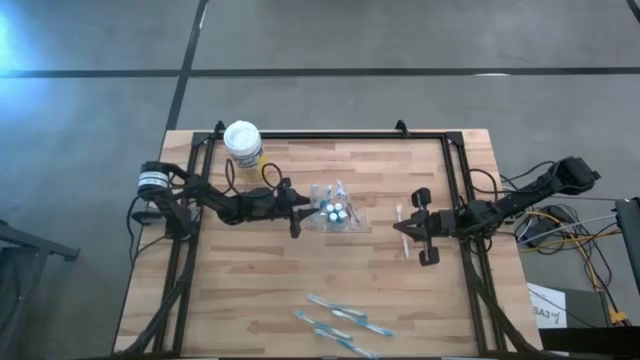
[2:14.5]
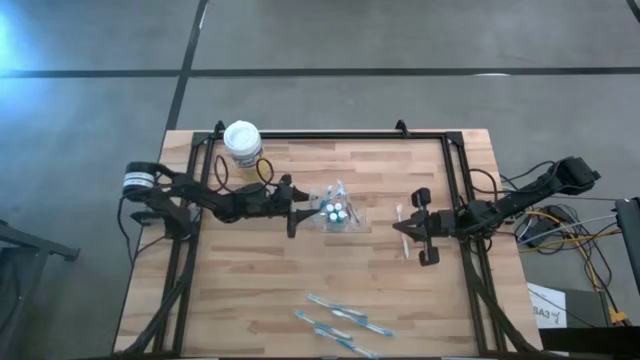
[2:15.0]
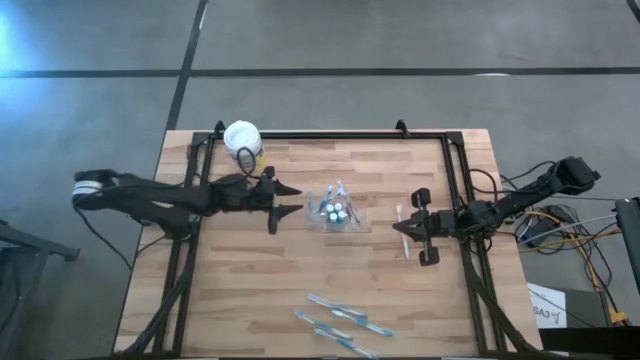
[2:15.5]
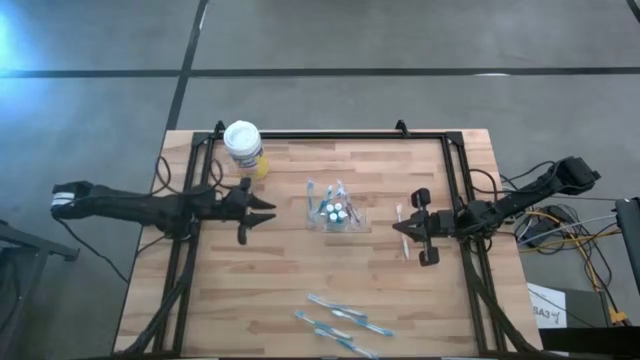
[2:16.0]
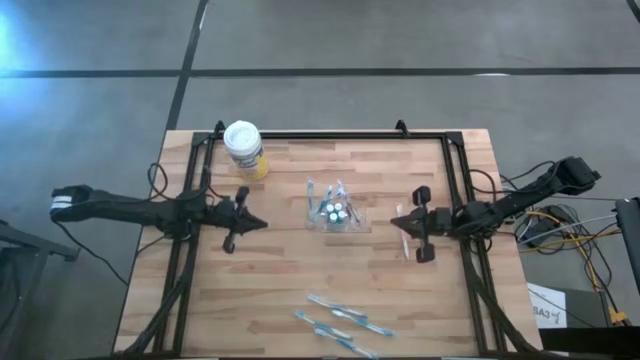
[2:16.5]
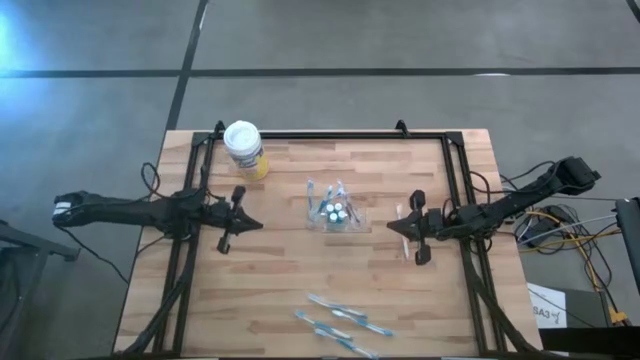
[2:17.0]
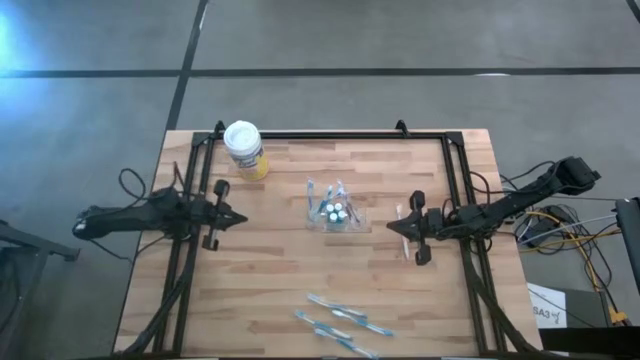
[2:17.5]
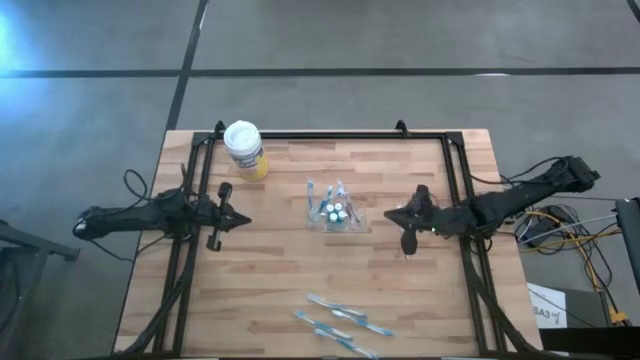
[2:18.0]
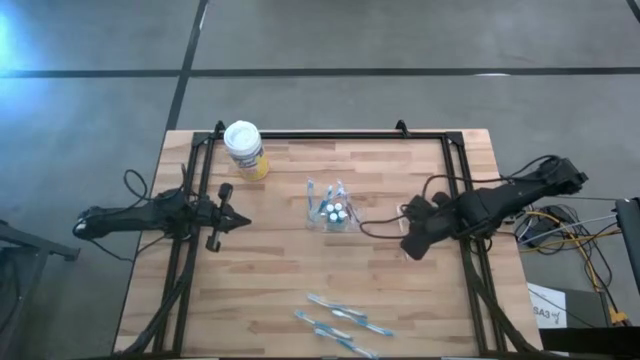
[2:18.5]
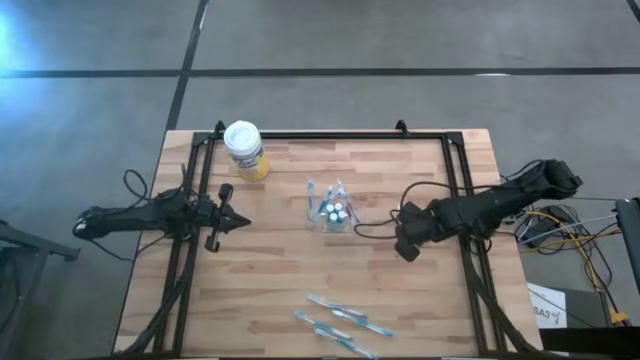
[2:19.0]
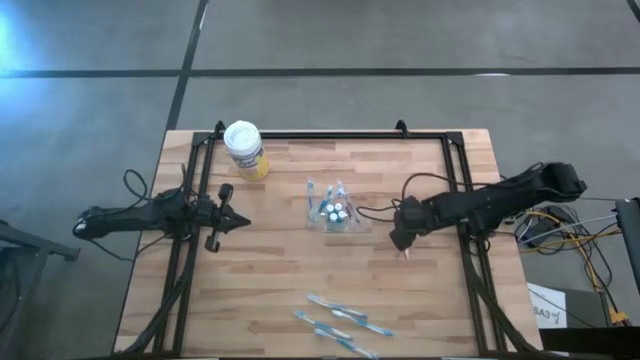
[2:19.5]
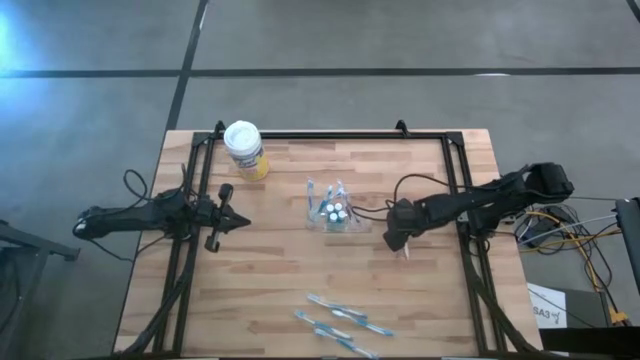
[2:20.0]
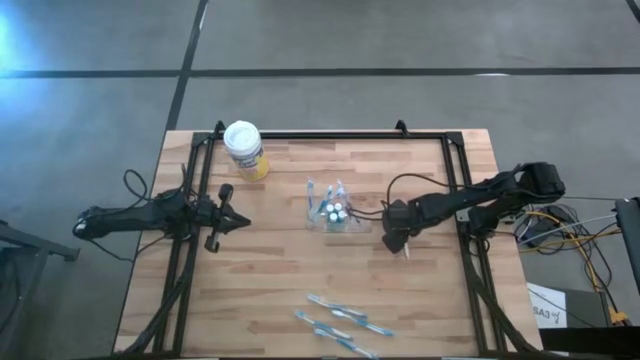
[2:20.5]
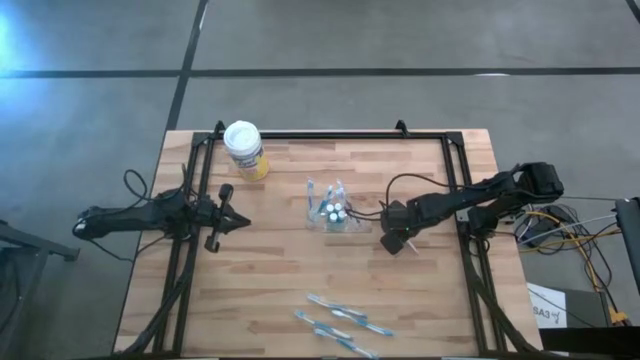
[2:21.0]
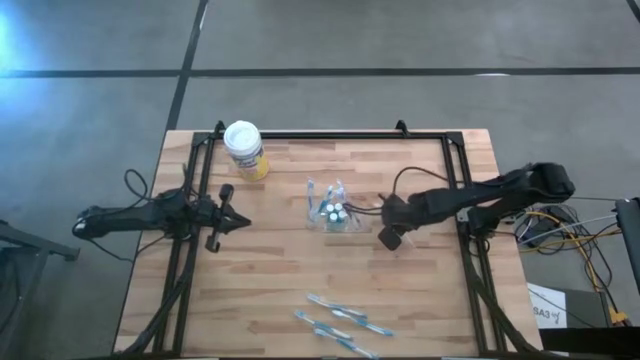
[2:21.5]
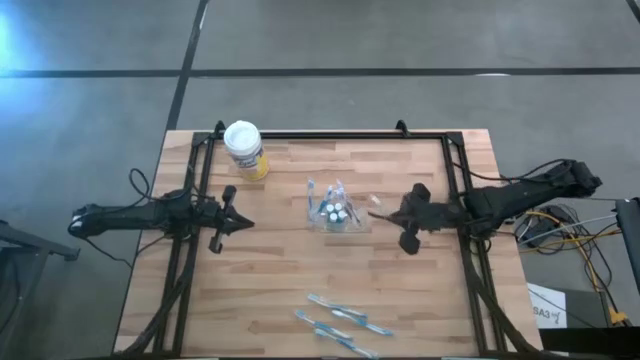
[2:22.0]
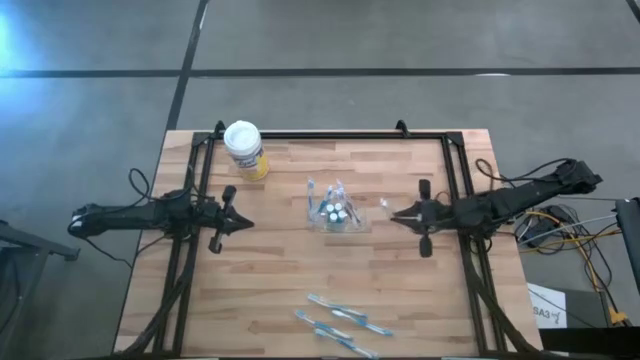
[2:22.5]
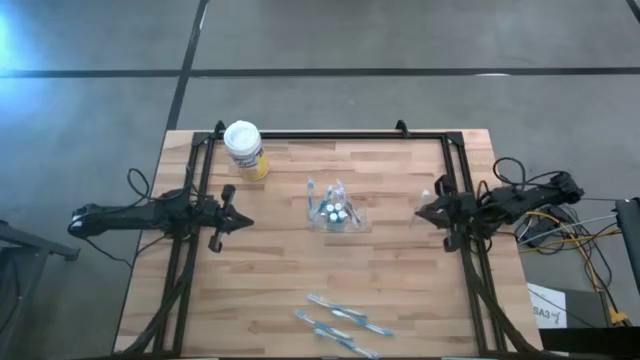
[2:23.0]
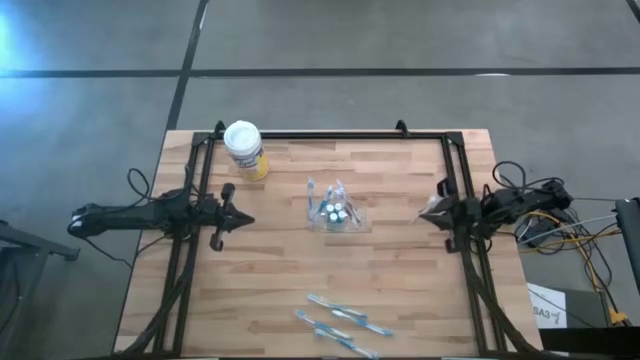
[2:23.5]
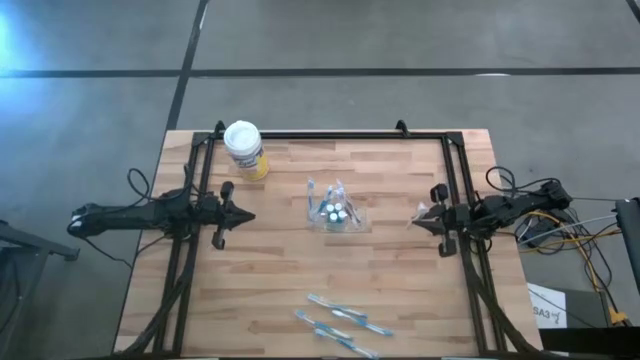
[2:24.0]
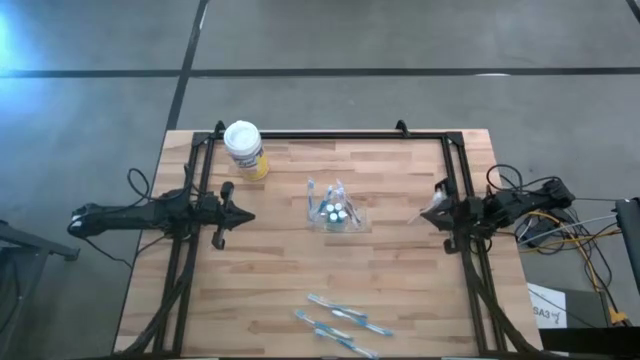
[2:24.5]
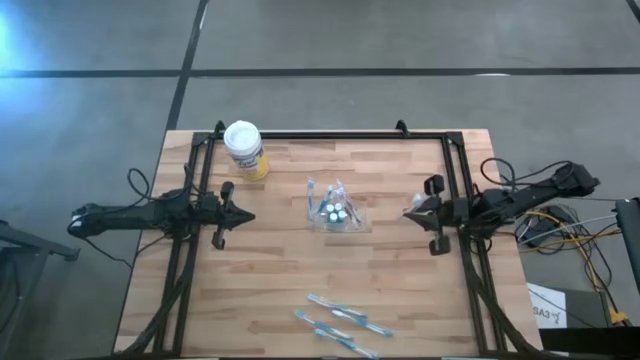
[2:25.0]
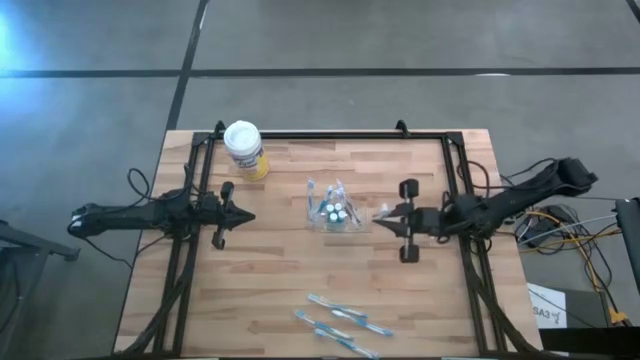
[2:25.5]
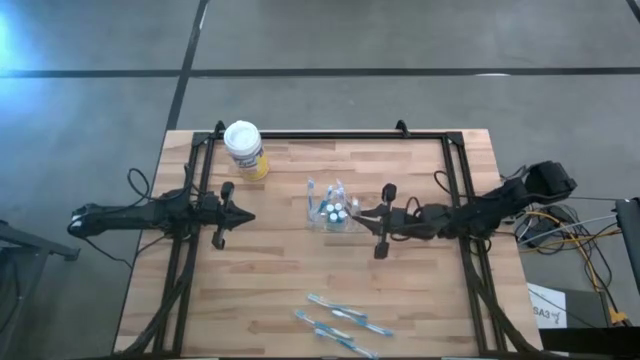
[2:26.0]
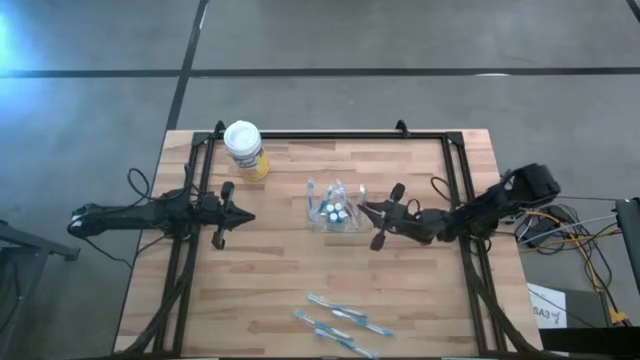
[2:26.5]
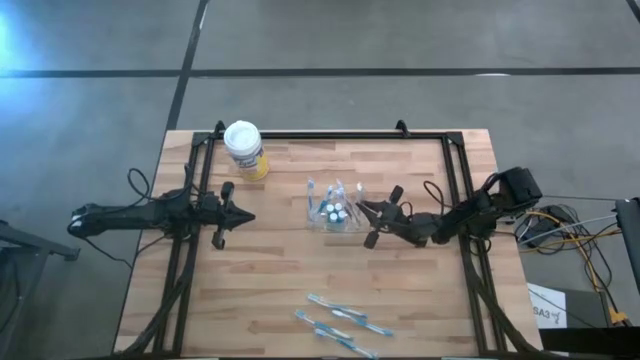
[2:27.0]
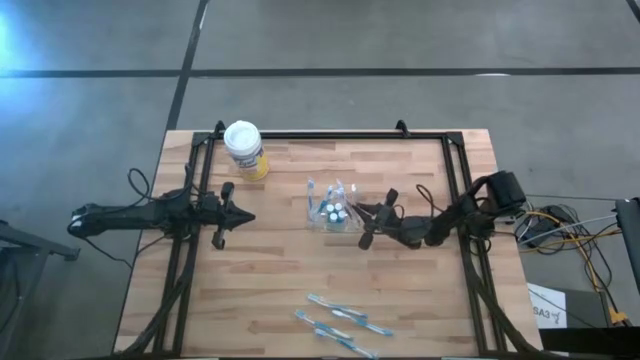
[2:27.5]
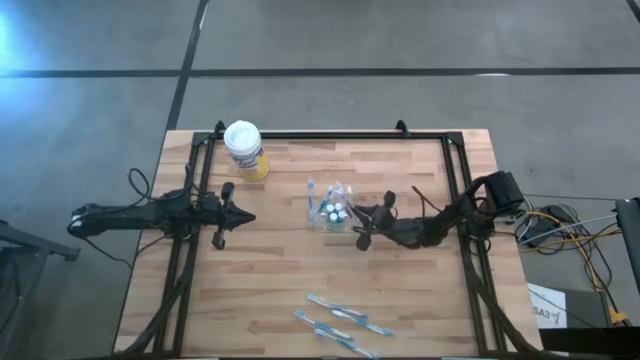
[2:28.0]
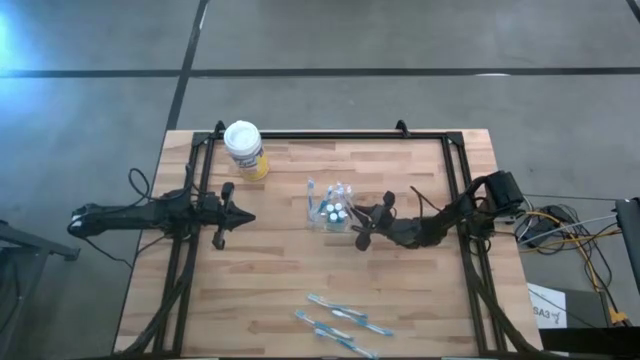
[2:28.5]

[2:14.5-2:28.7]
Task: Pick & Place toothbrushing station
Put the orange toothbrush into the right compartment of the transparent organizer

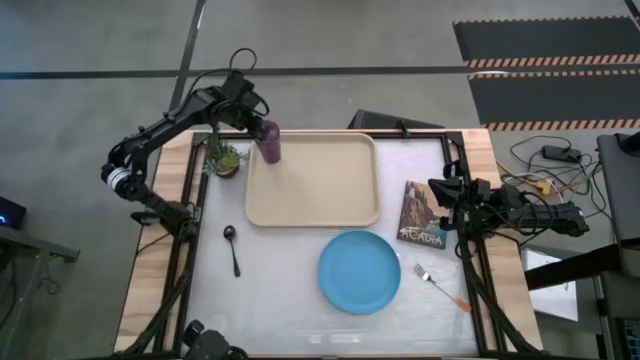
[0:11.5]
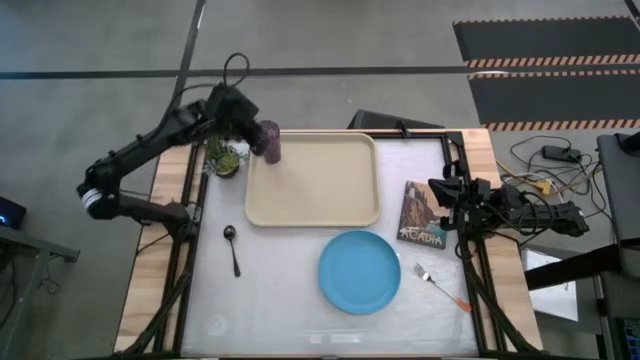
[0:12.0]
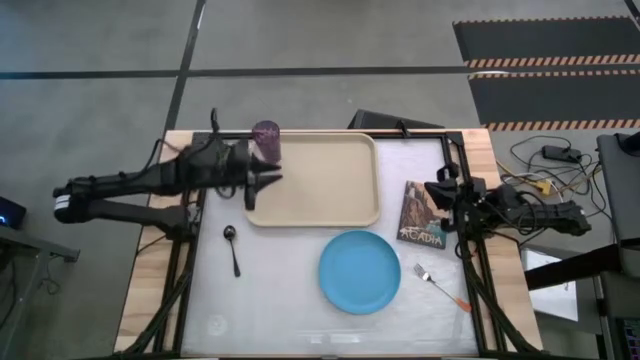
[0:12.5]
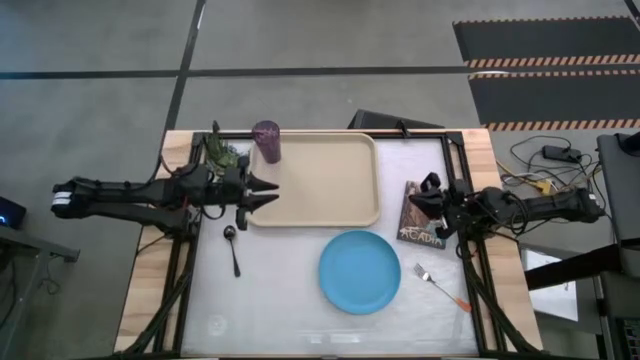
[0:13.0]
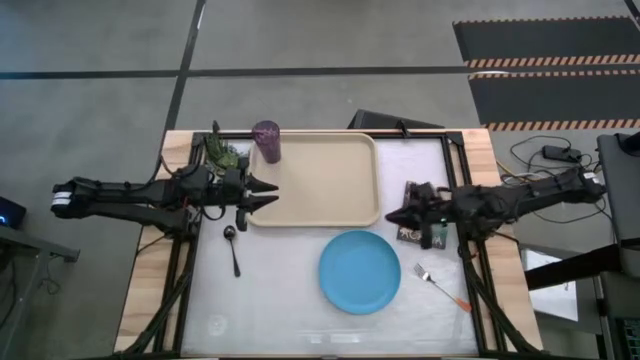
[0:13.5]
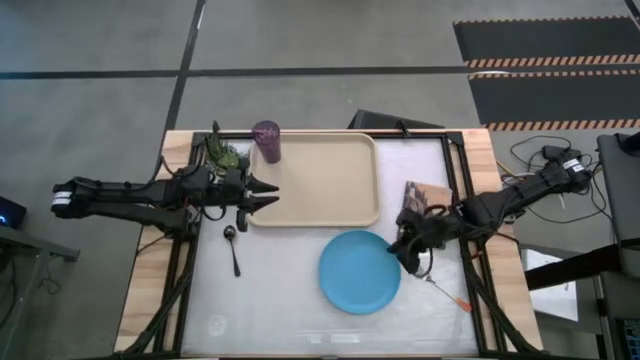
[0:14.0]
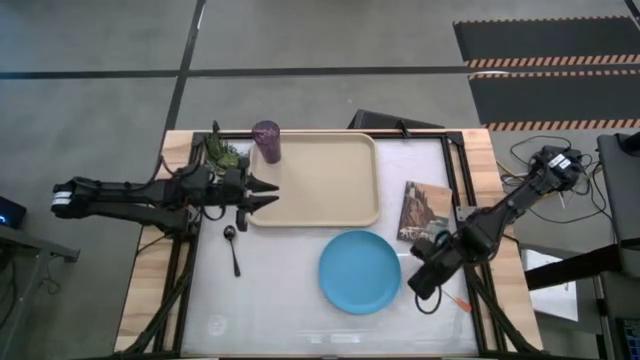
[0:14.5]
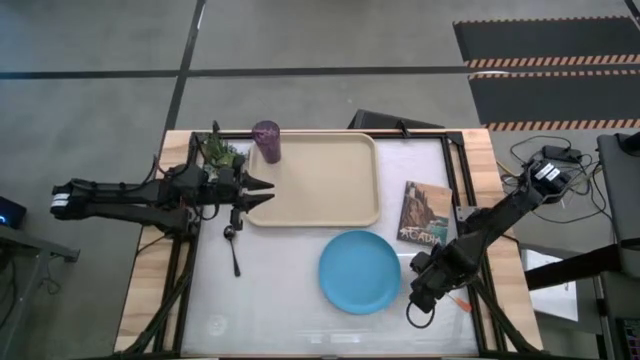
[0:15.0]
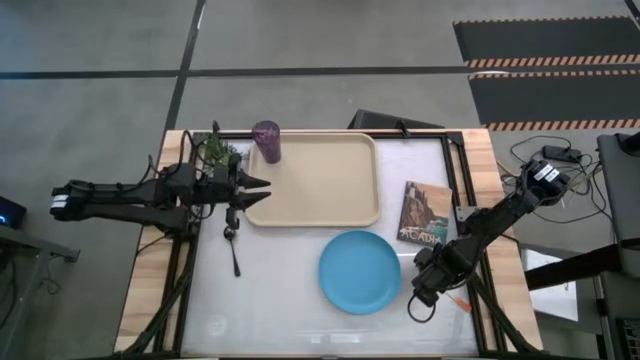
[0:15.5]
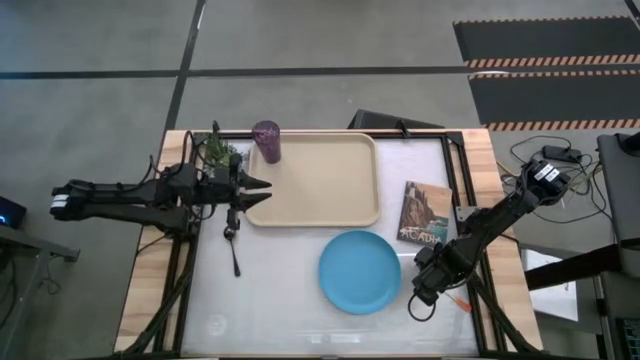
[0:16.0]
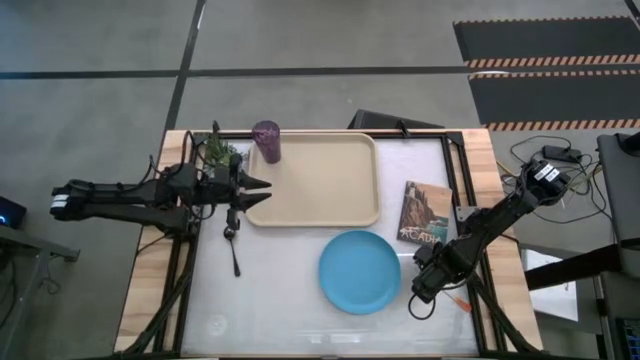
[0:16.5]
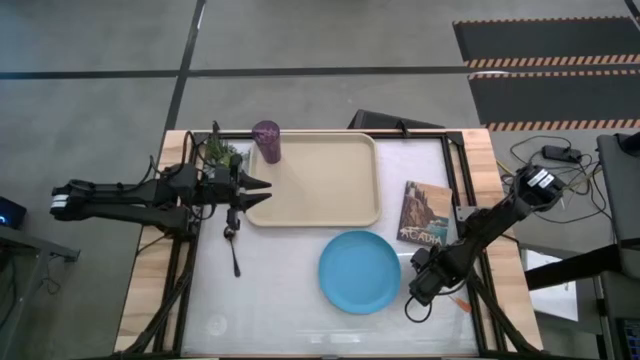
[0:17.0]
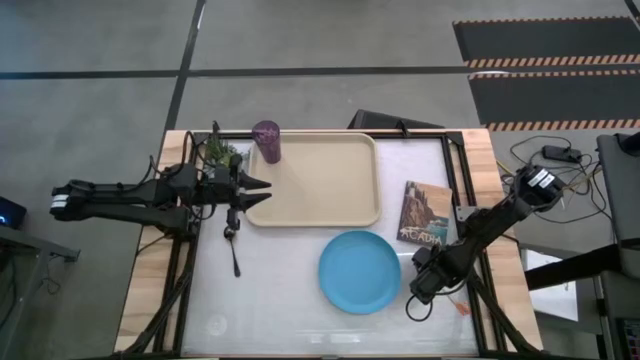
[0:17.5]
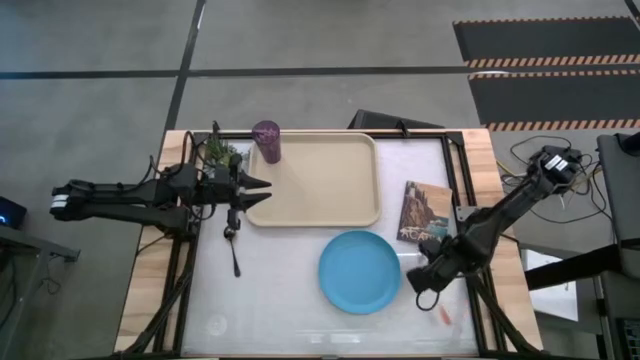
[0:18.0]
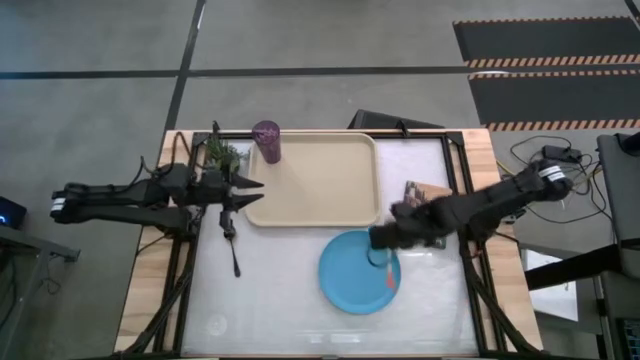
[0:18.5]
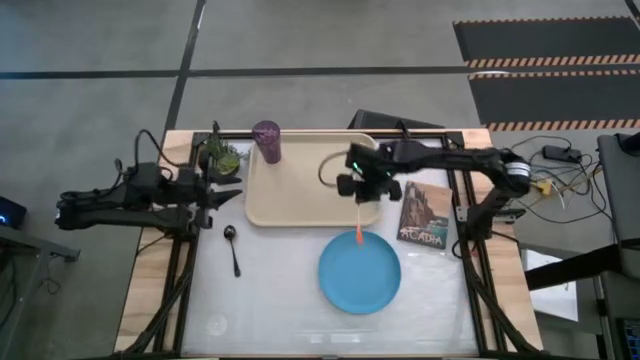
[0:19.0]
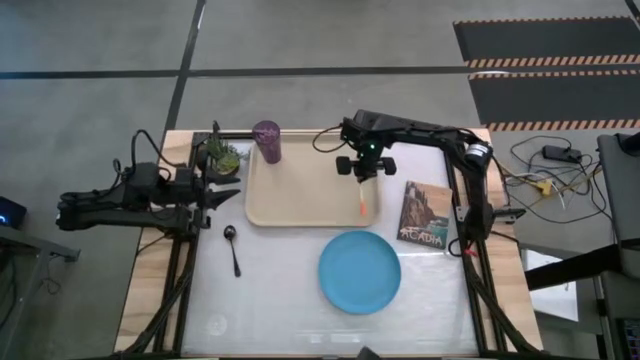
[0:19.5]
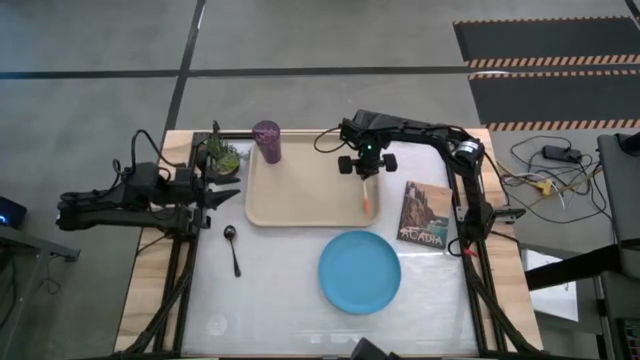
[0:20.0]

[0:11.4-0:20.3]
Task: Pick and place plate/cup/fork/spoon on tray
Put the orange fork on the brown tray to the bottom right of the violet cup
